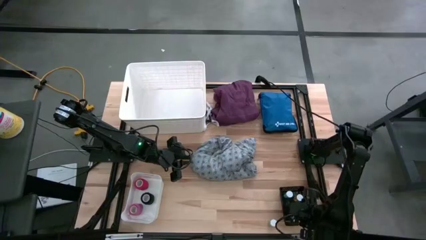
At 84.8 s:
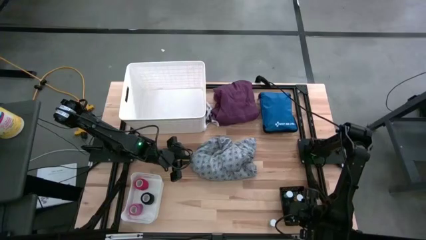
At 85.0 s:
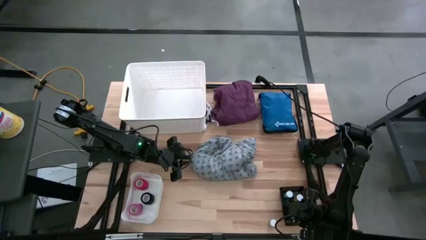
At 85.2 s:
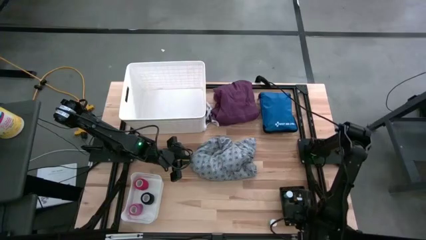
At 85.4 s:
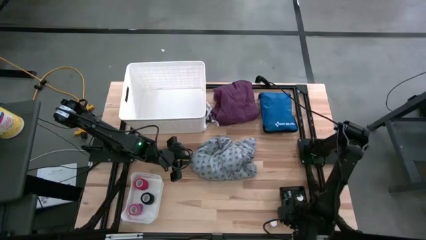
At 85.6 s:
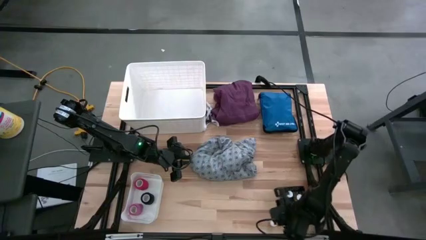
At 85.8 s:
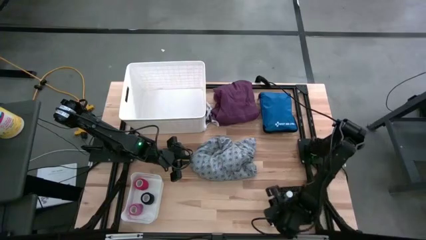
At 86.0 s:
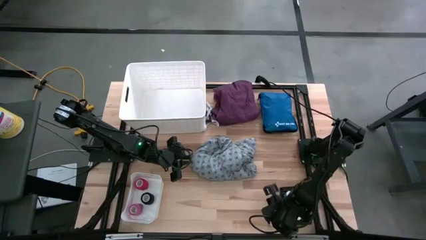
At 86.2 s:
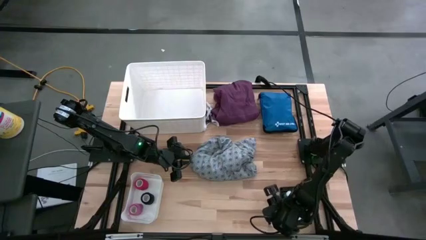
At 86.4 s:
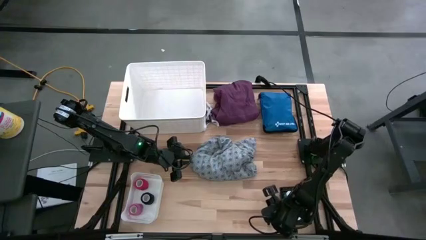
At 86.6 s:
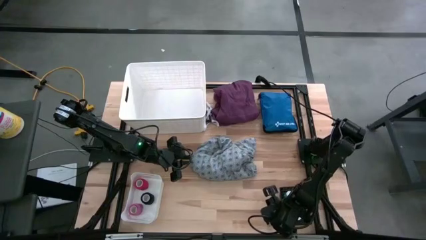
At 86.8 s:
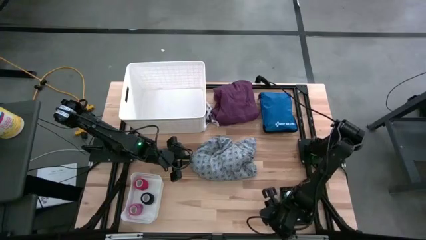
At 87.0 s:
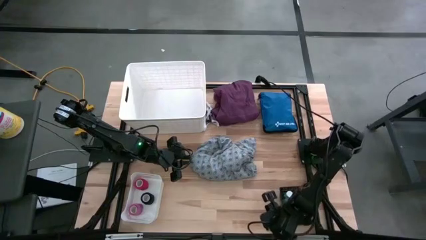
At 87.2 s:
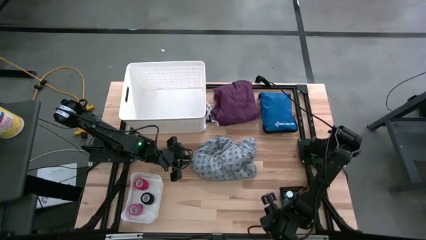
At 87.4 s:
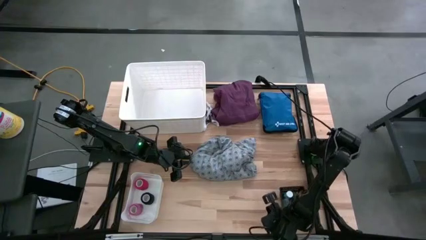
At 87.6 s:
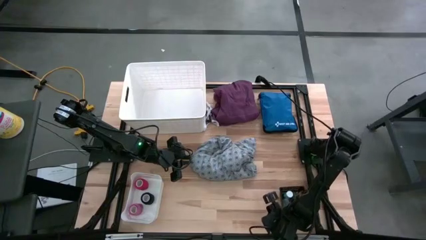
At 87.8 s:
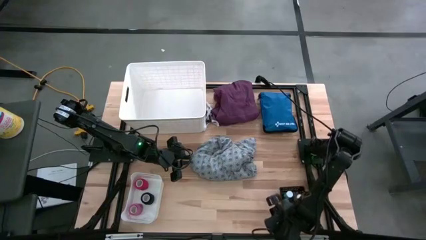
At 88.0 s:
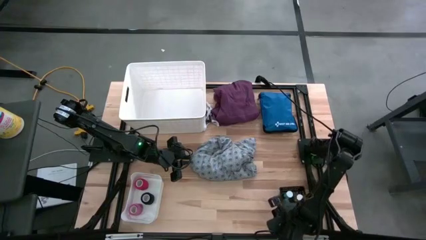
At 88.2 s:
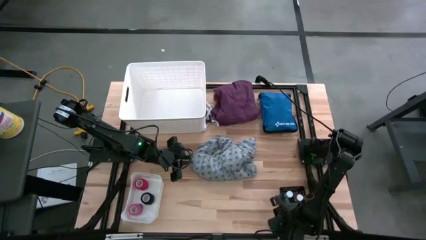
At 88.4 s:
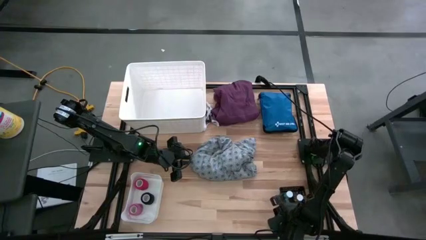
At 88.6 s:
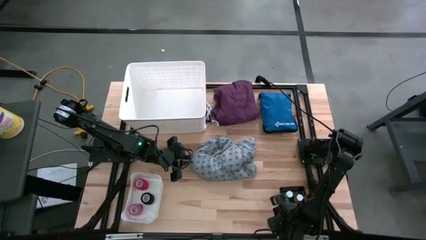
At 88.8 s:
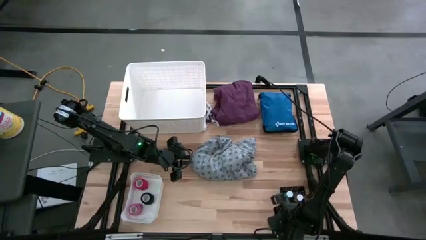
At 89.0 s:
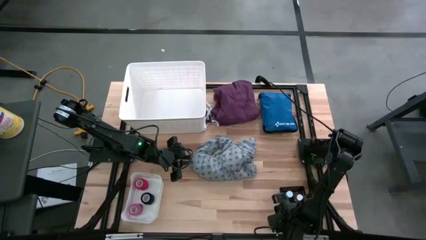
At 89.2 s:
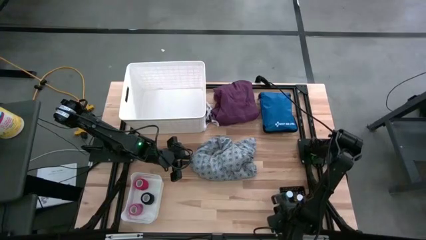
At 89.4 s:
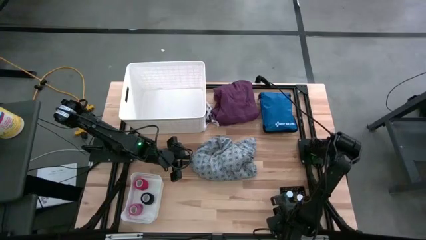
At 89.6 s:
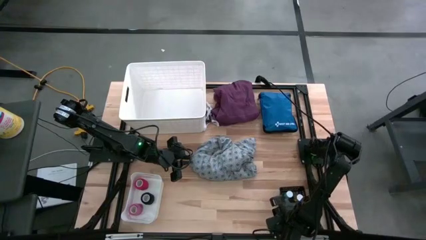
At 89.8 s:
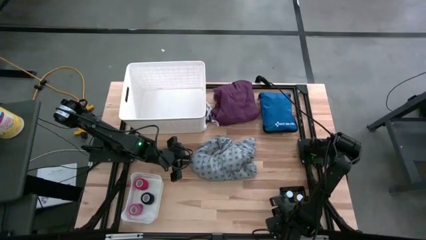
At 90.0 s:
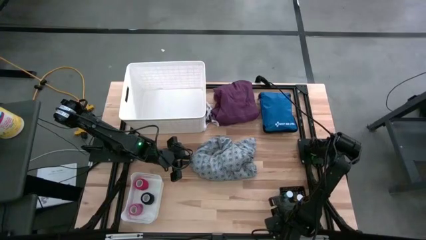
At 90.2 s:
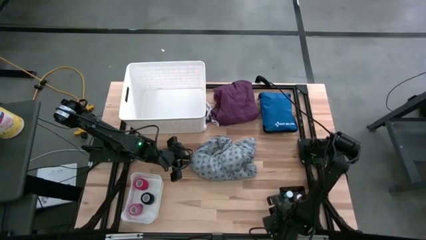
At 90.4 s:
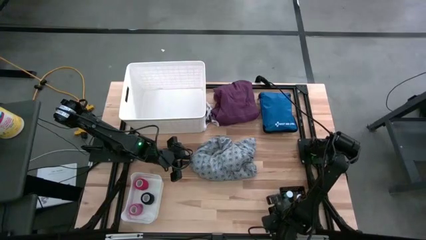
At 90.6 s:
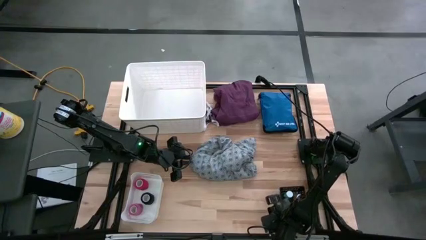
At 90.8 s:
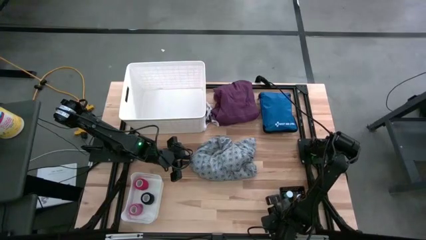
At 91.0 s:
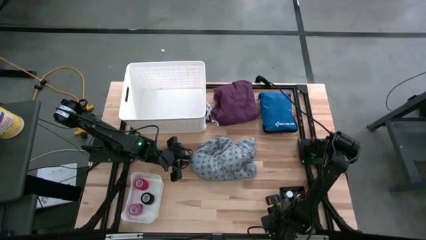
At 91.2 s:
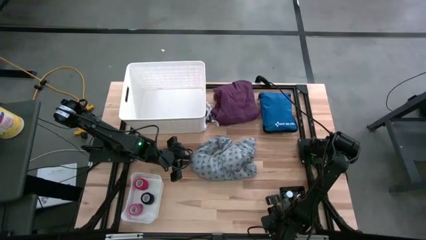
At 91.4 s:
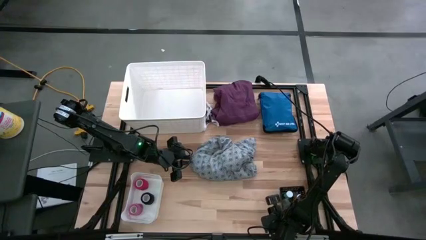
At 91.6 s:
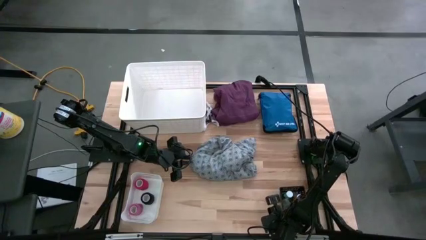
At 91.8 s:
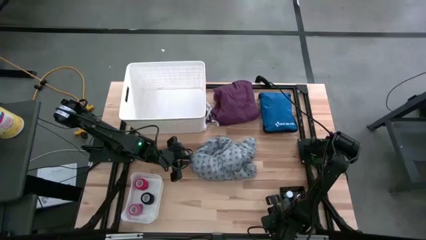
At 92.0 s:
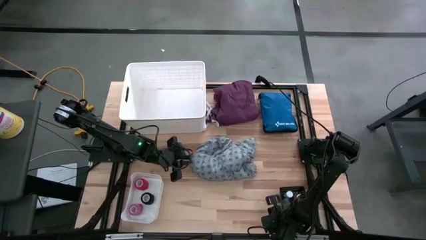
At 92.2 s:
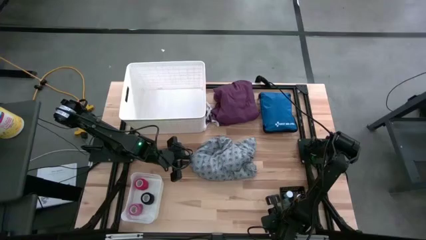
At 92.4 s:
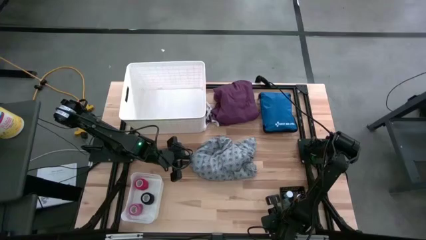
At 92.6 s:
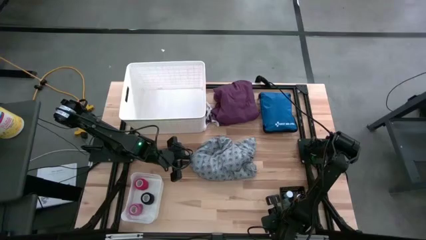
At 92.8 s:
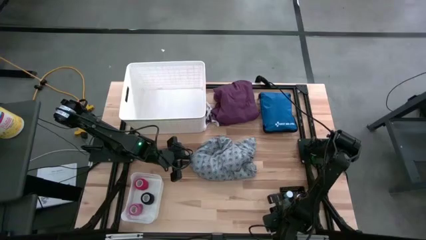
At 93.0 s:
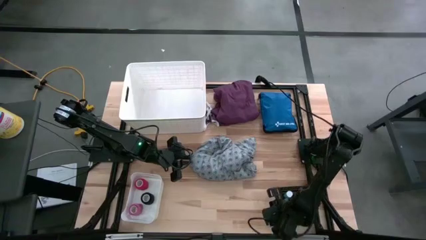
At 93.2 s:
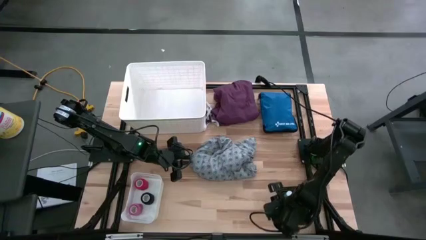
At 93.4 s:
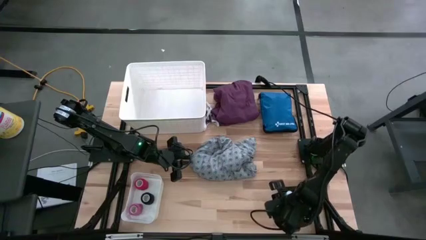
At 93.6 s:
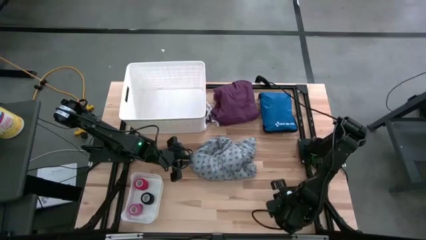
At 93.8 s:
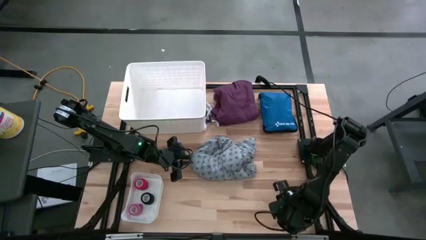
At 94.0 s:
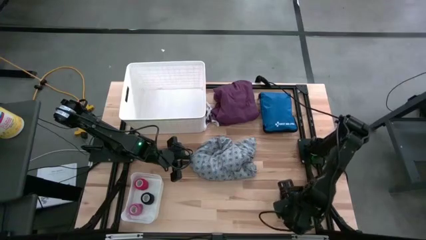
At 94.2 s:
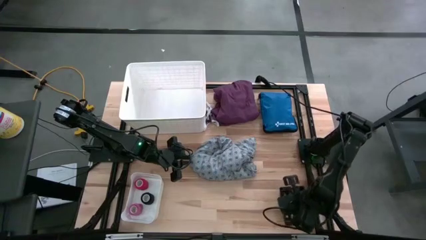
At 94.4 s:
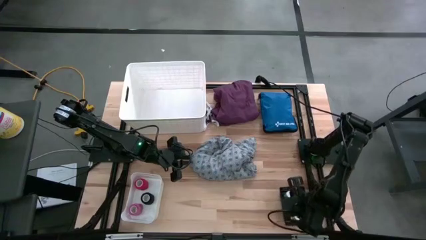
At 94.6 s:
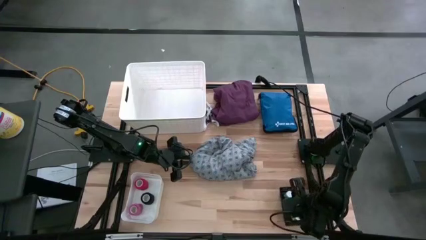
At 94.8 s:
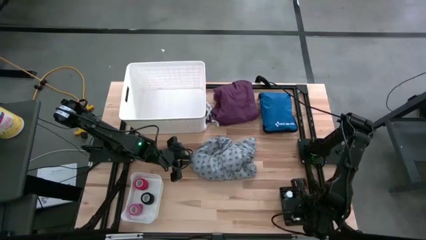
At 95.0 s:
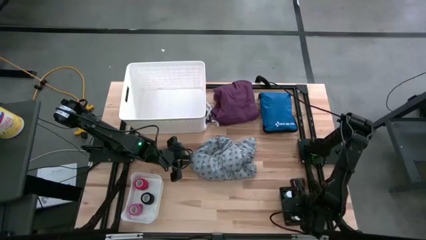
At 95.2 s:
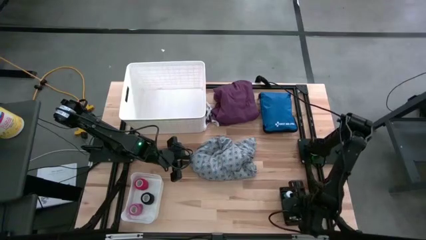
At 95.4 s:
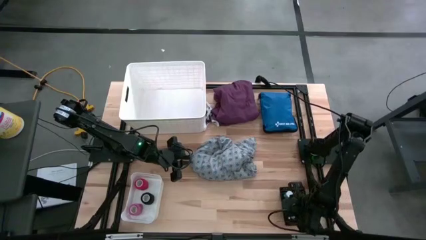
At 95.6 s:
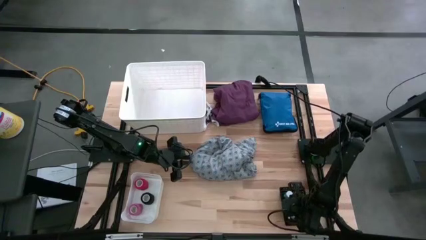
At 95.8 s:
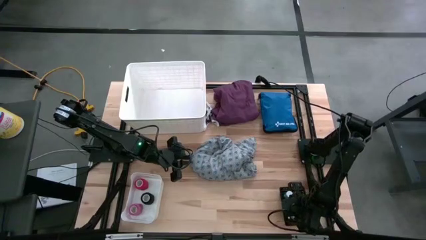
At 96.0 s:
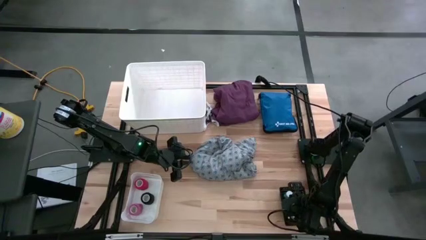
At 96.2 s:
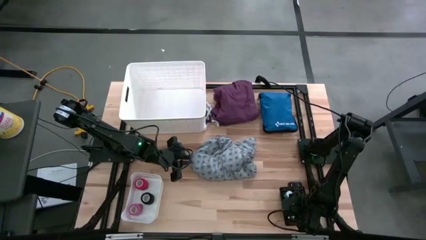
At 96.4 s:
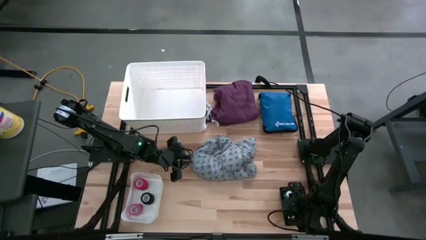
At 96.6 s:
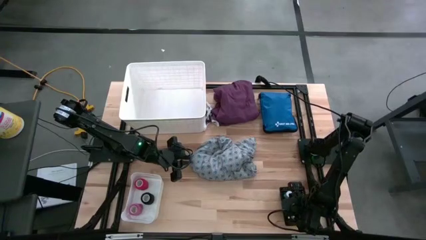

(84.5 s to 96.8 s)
Task: Pick & place medical supplies in basket/bin
Put the blue pill bottle into the black bin
